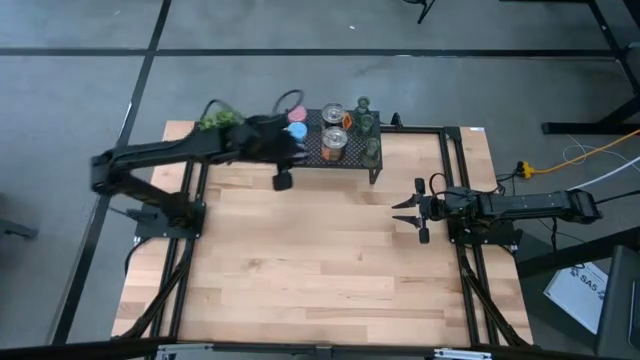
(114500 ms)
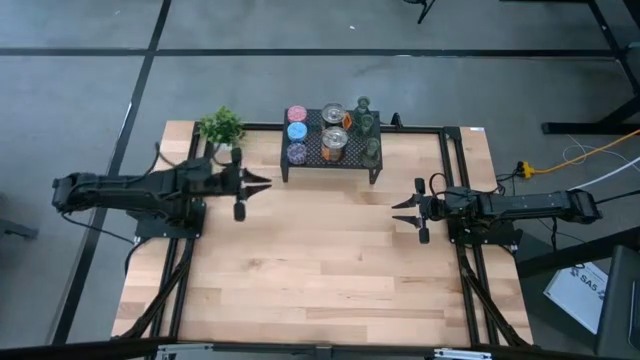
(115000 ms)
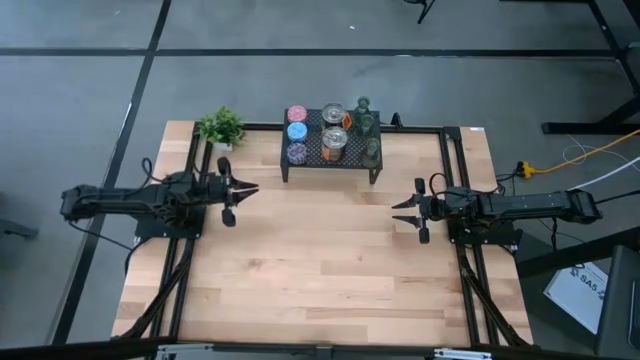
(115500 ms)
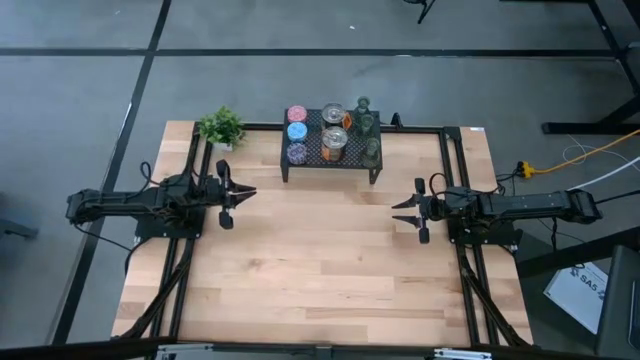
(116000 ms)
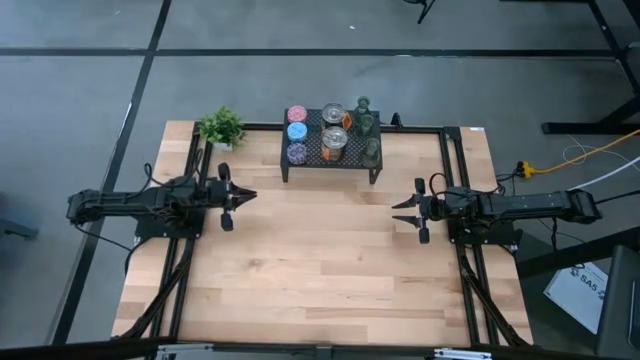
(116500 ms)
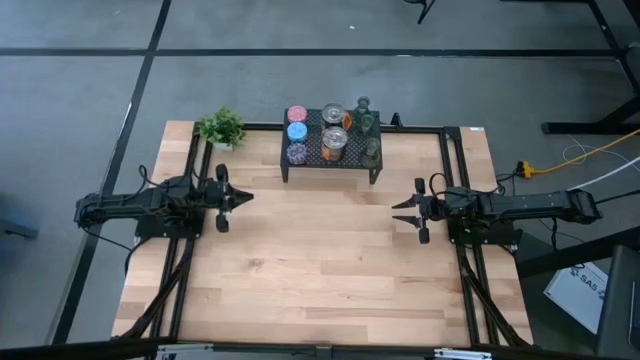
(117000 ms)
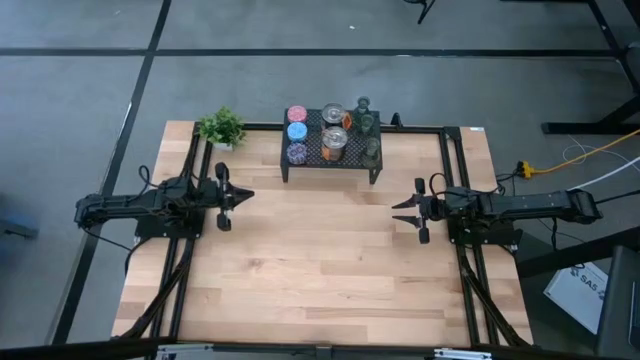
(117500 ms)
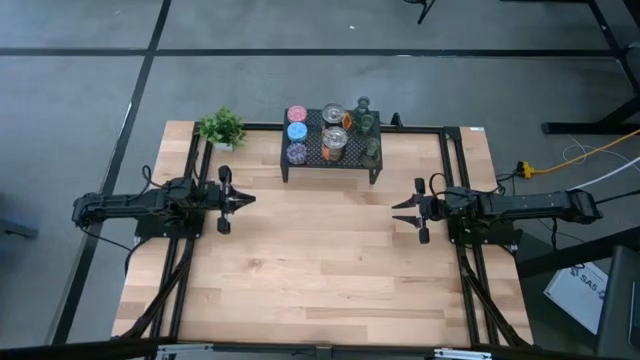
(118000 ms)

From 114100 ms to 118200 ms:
Task: Pick & Place candle stick holders
Return to Home Position

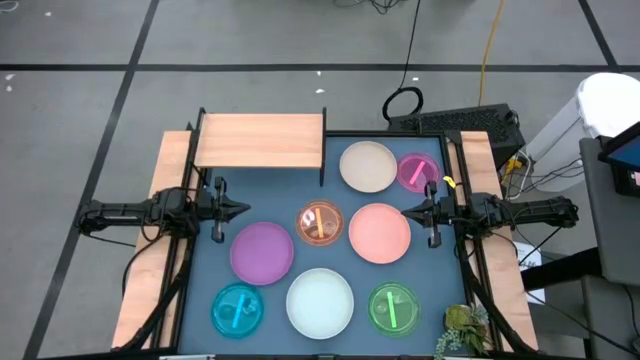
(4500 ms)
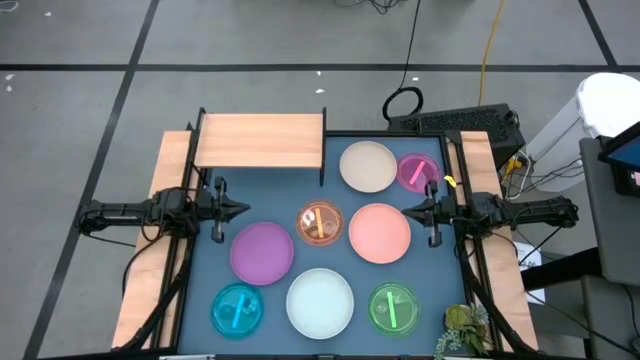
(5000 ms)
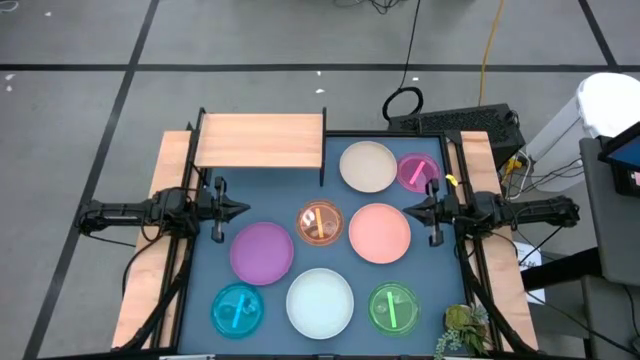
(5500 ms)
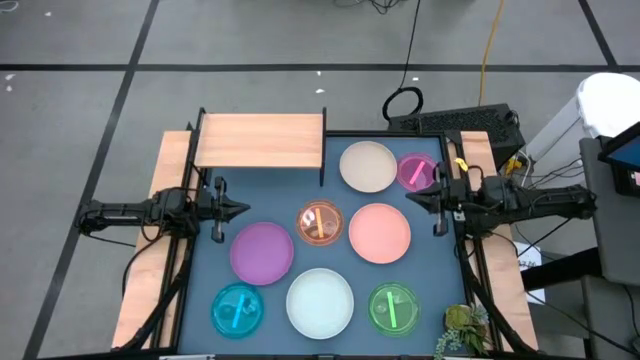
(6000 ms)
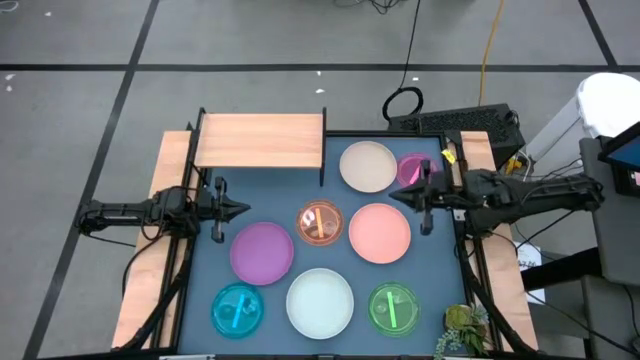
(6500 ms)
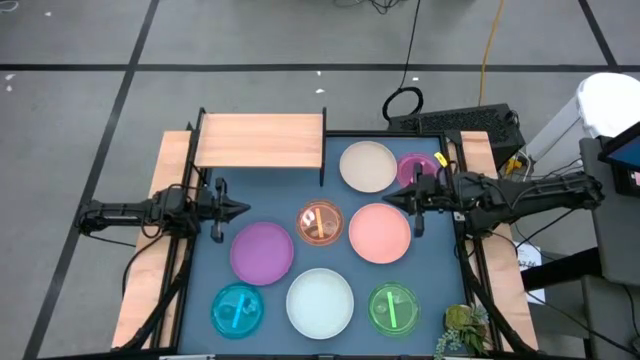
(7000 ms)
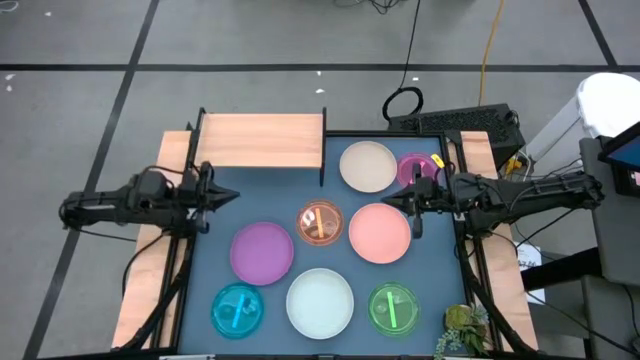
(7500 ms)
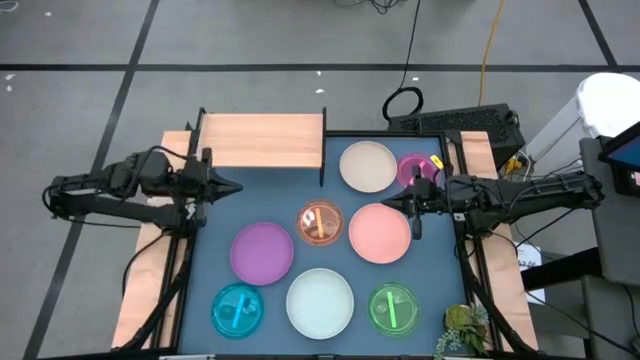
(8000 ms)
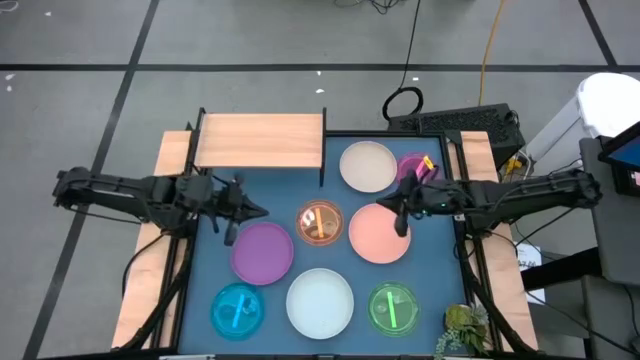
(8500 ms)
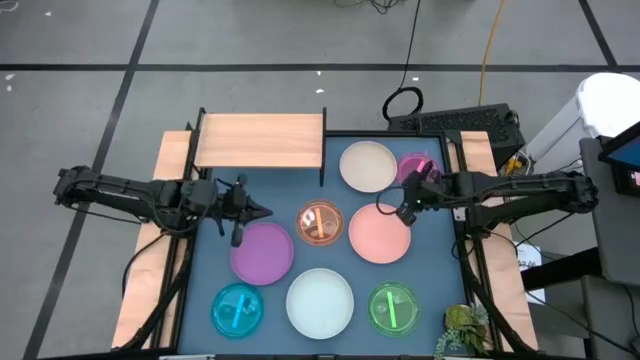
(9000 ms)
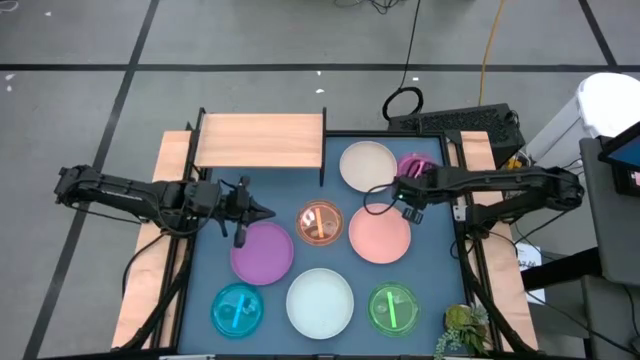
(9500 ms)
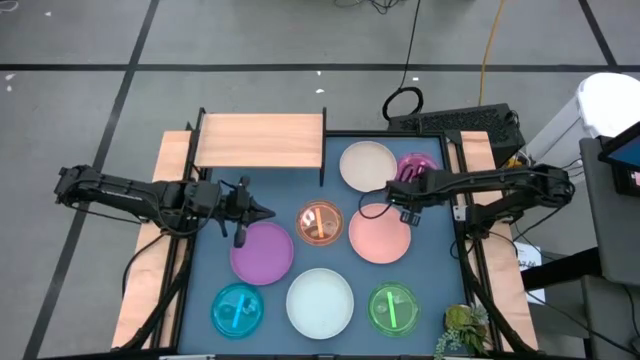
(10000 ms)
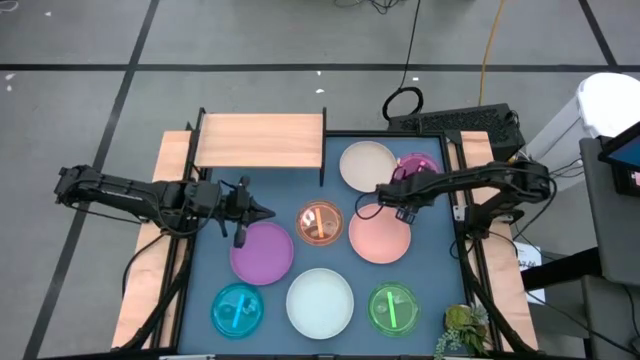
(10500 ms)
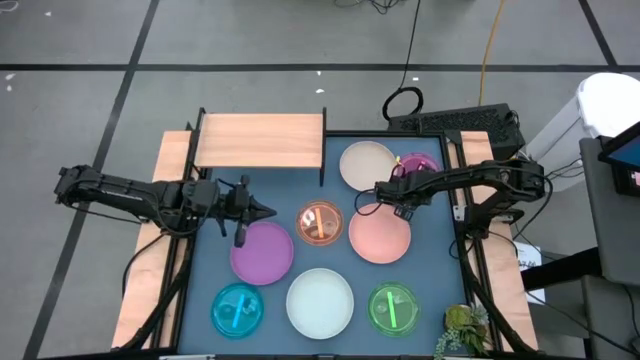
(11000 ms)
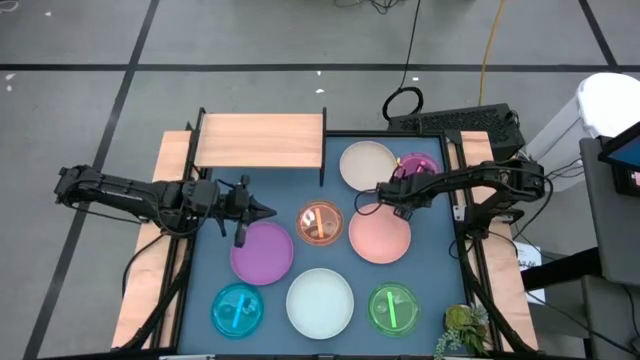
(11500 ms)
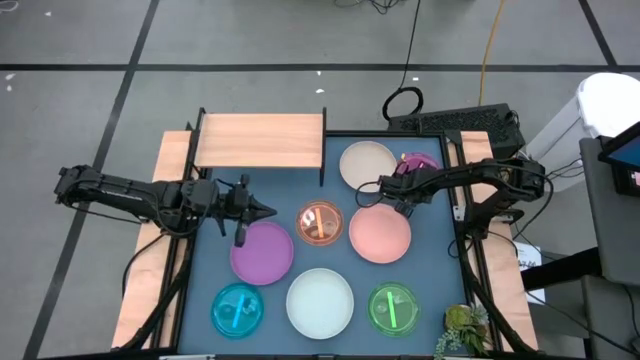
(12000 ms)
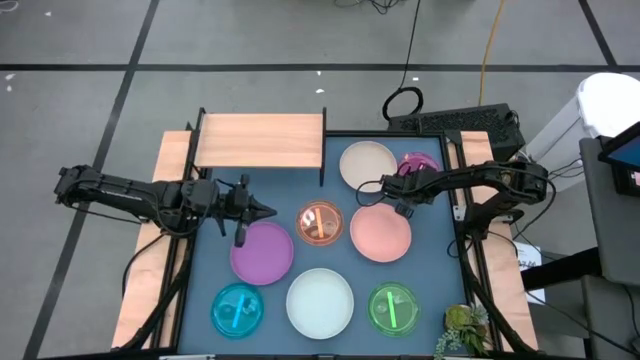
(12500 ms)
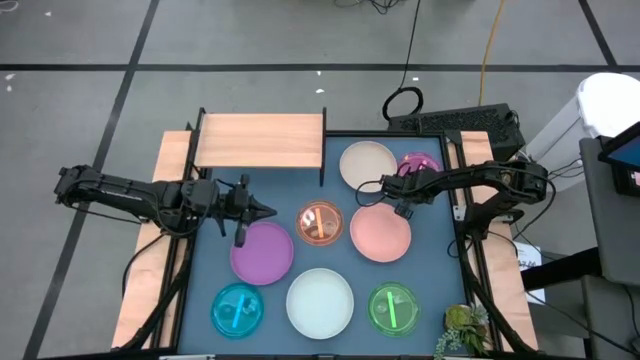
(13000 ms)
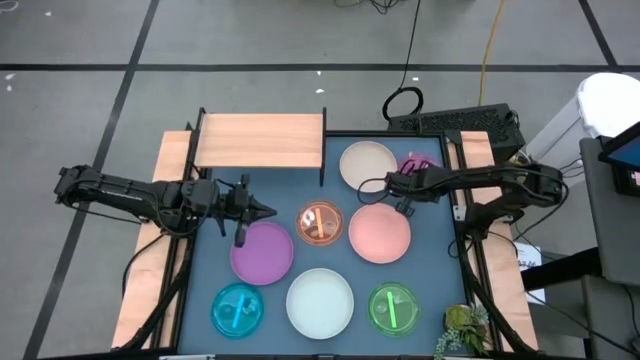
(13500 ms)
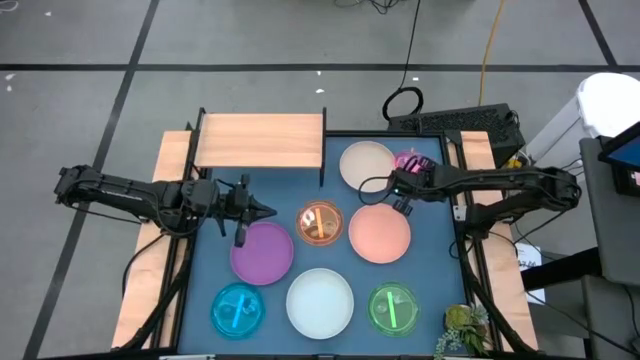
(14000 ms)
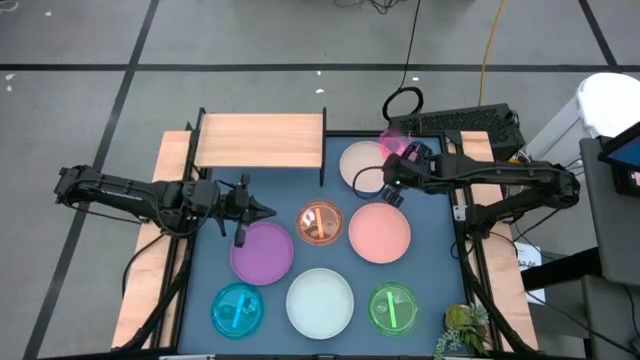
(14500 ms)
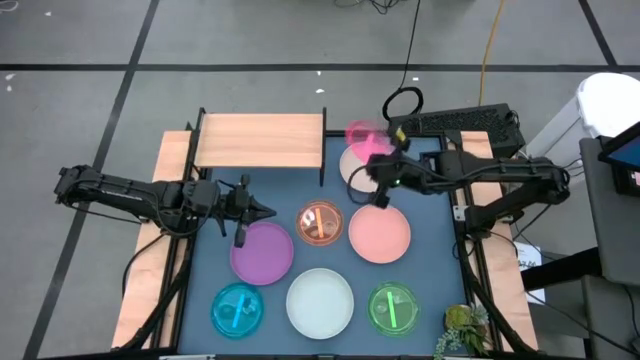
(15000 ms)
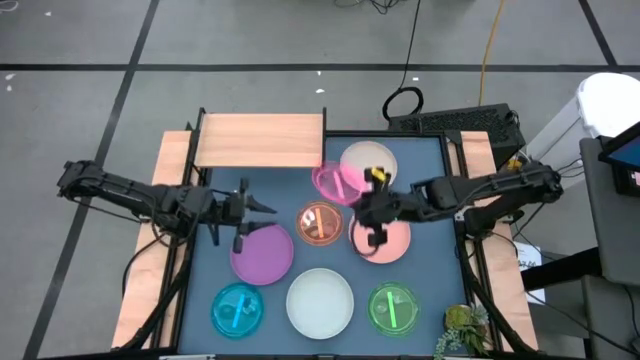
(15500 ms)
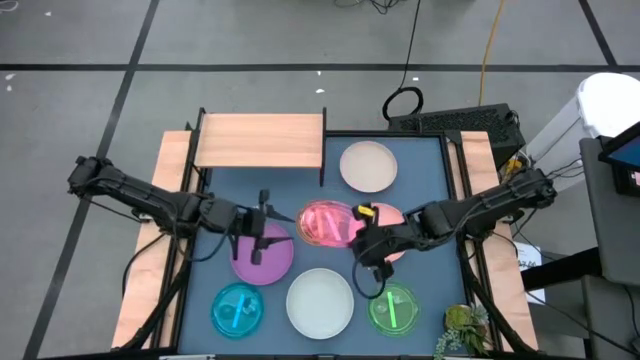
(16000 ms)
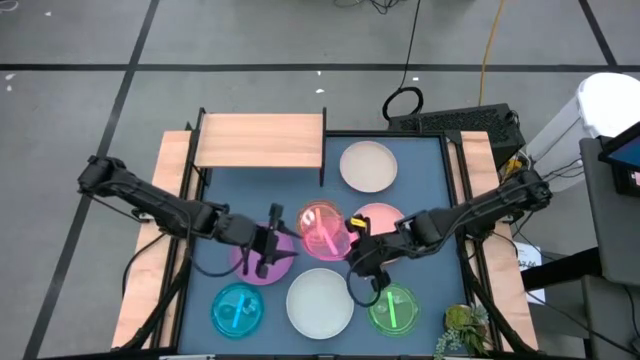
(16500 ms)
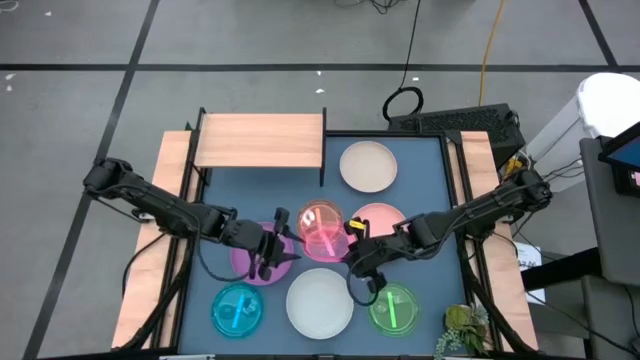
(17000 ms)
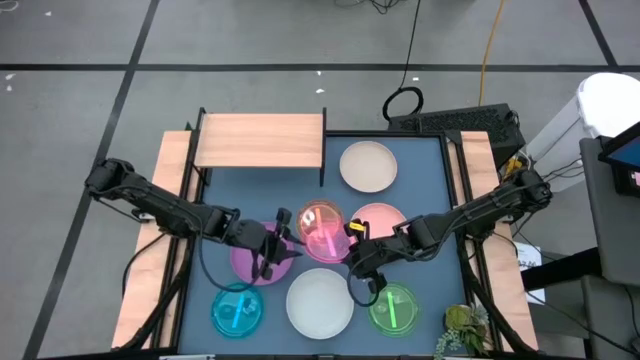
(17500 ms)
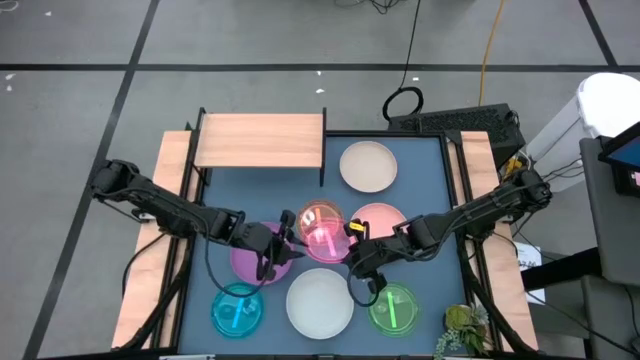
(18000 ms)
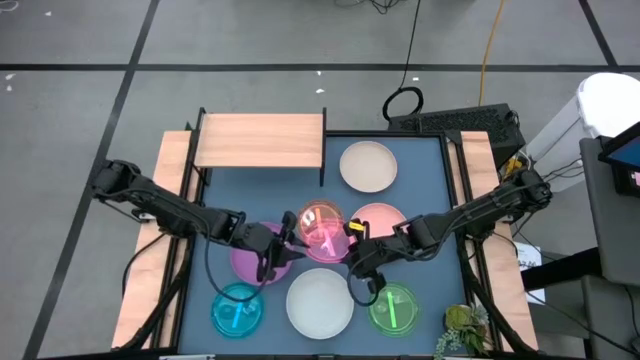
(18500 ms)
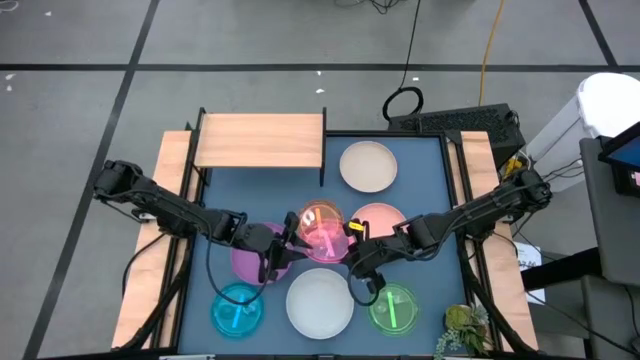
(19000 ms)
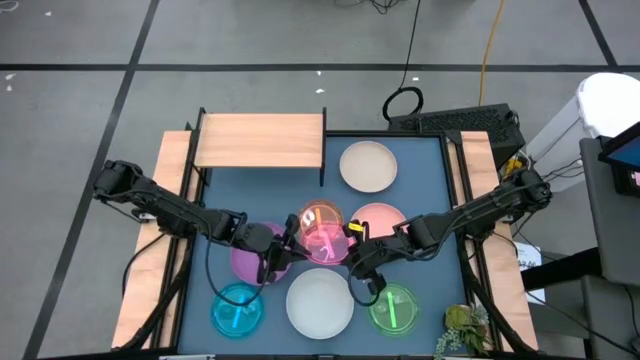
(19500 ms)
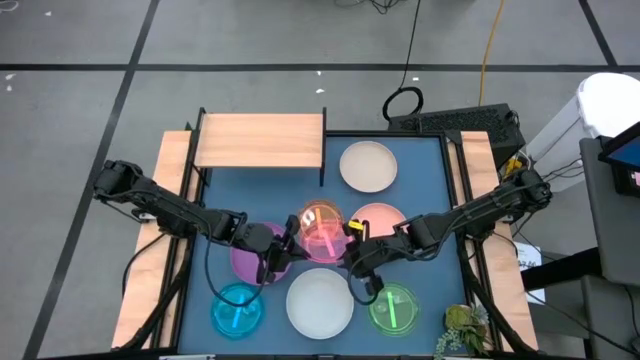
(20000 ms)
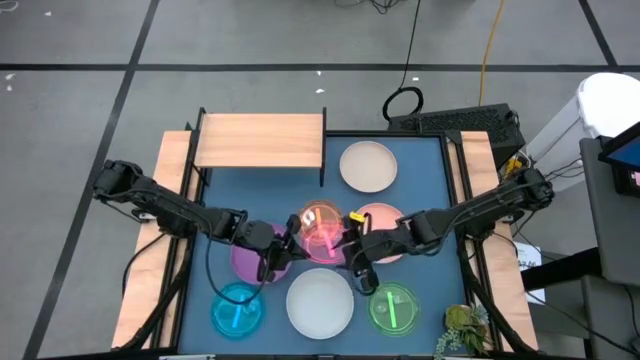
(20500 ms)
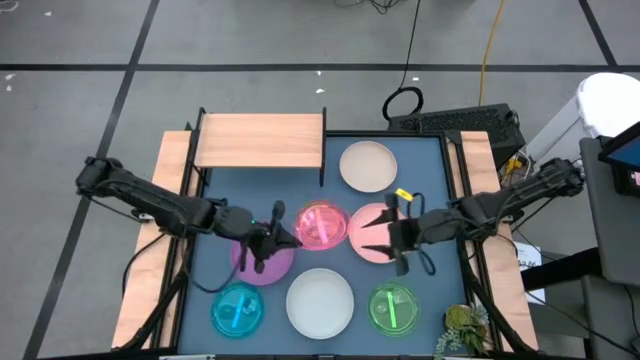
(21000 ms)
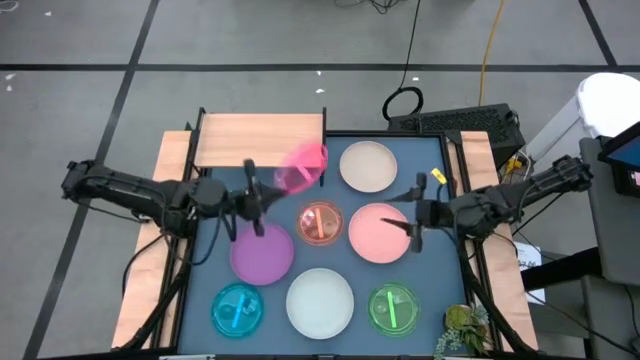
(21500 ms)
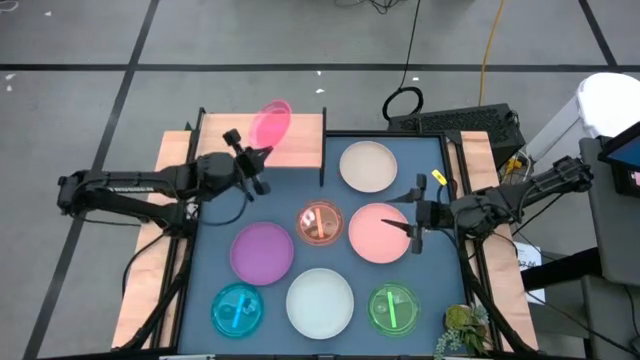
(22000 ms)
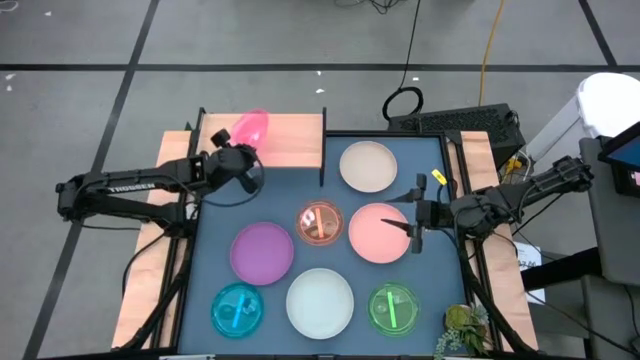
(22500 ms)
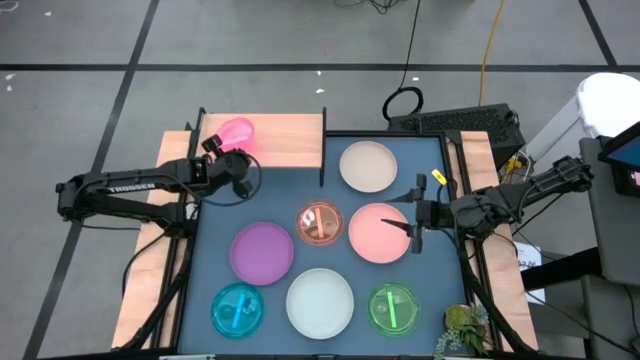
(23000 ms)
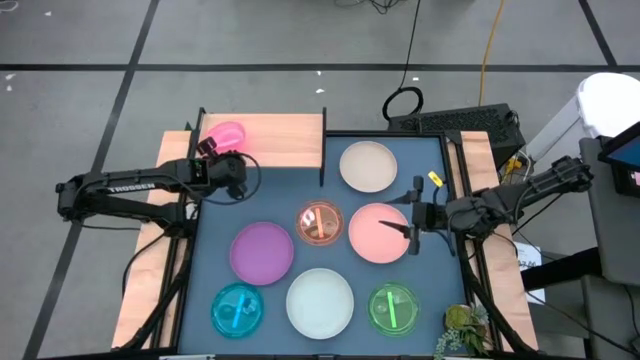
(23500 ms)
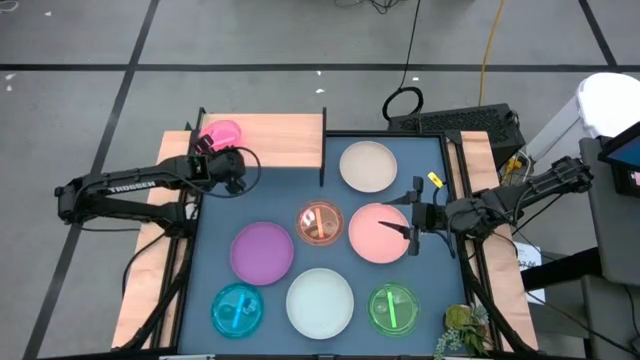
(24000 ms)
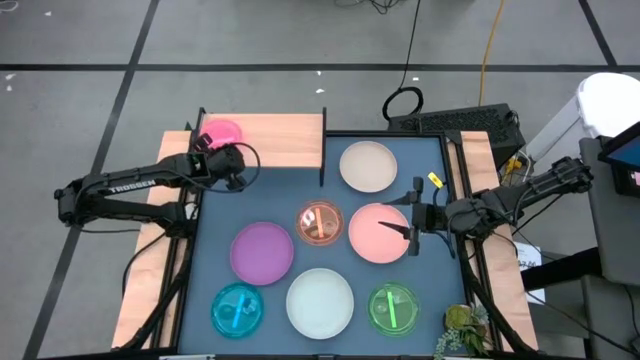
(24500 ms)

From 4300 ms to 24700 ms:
Task: Place and stack plates onto a shelf
Put the light pink plate on the shelf
